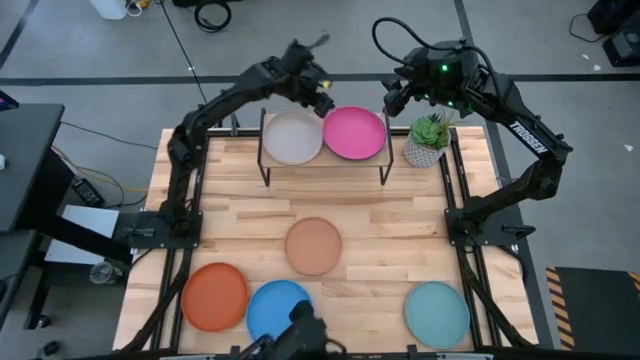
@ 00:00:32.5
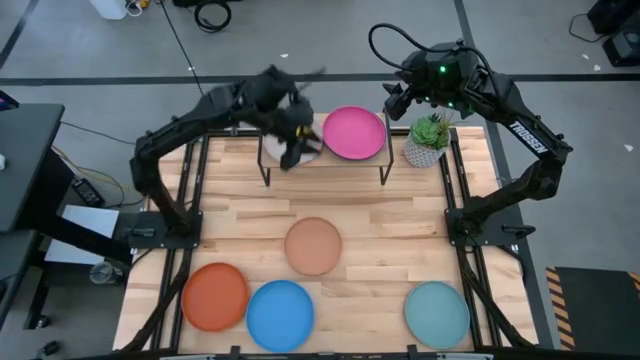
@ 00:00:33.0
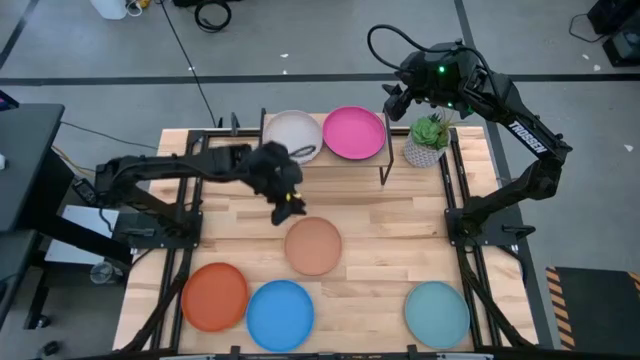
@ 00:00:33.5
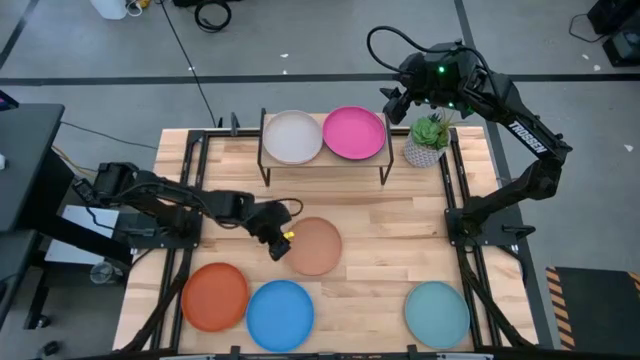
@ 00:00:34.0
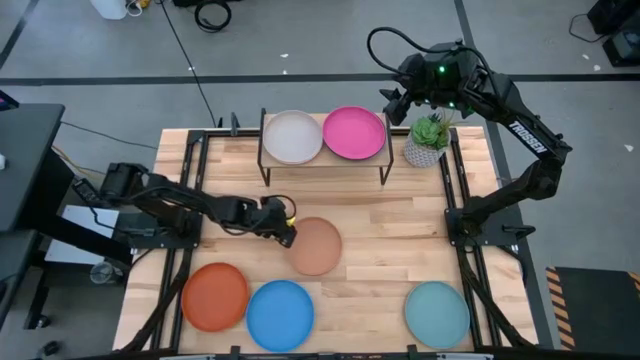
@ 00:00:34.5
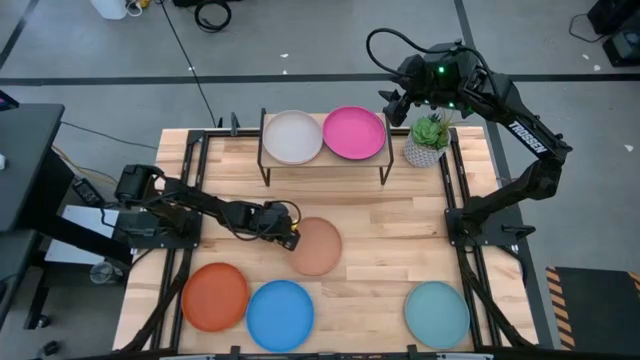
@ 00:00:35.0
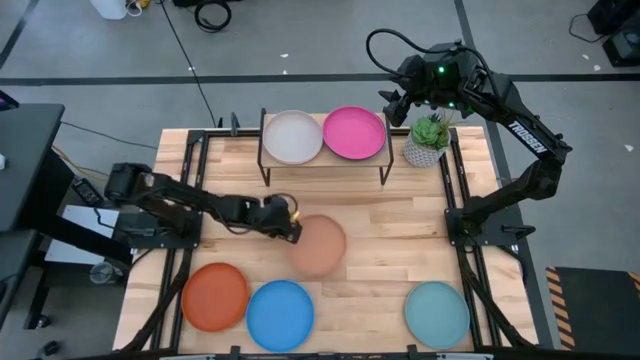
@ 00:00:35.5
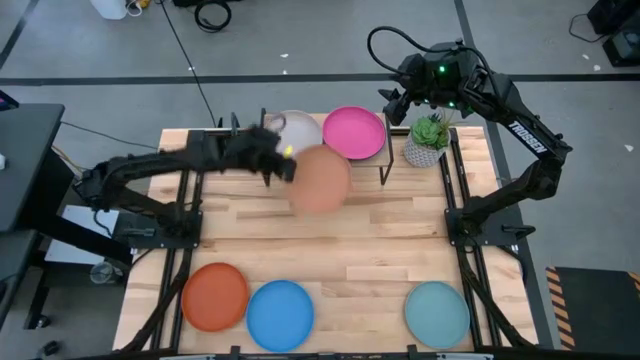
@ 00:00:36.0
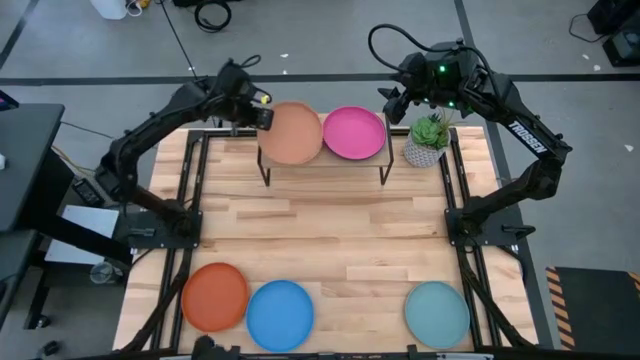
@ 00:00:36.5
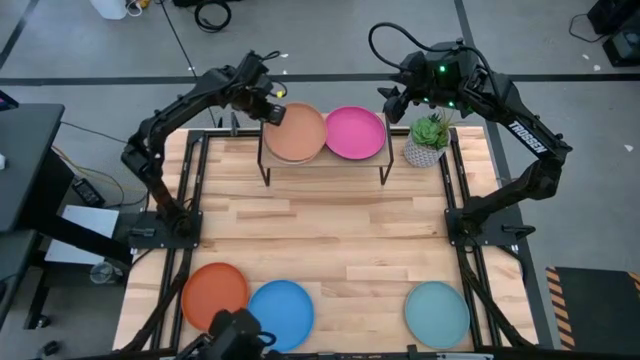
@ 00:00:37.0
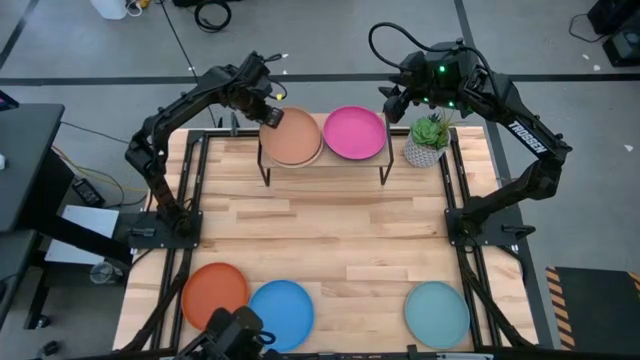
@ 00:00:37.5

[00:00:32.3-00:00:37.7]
Task: Place and stack plates onto a shelf
Stack the brown plate on top of the gray plate on the shelf

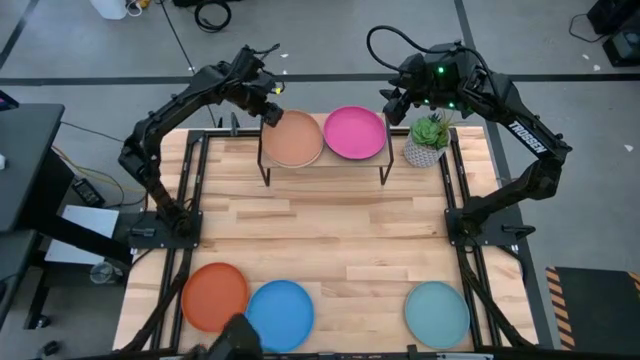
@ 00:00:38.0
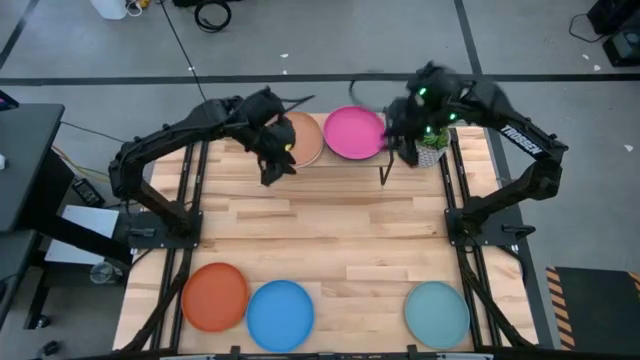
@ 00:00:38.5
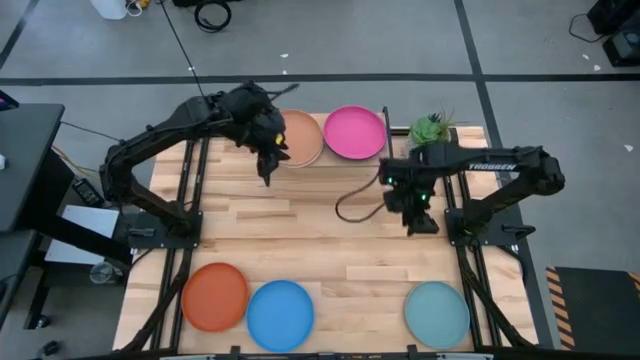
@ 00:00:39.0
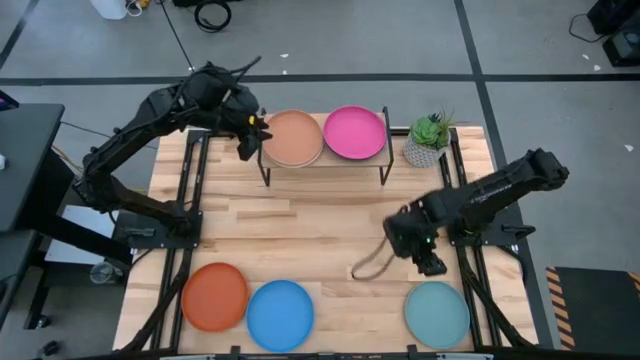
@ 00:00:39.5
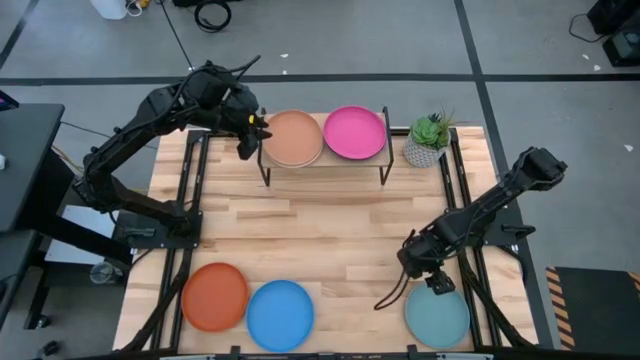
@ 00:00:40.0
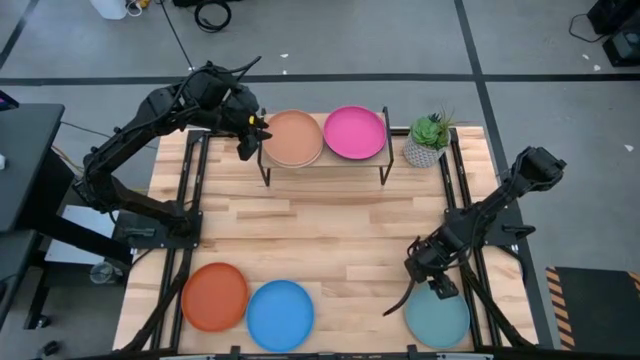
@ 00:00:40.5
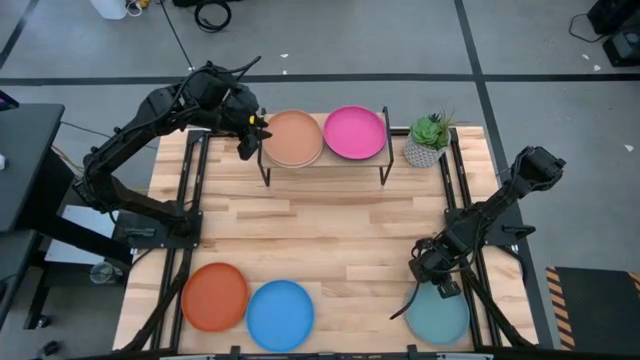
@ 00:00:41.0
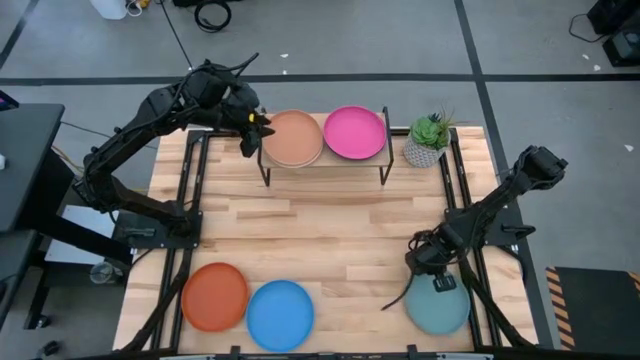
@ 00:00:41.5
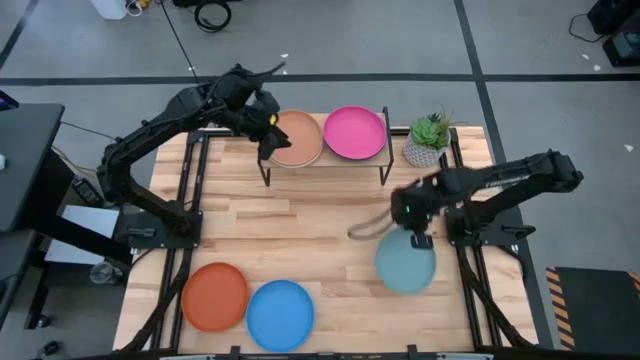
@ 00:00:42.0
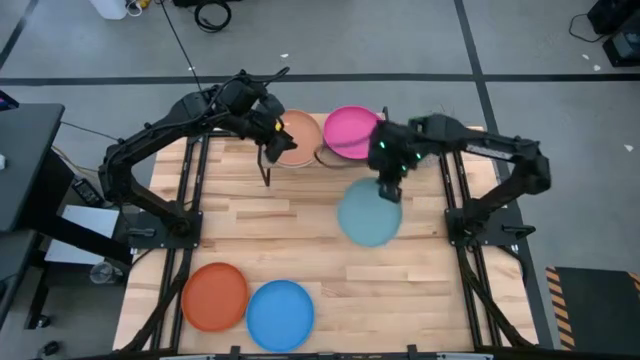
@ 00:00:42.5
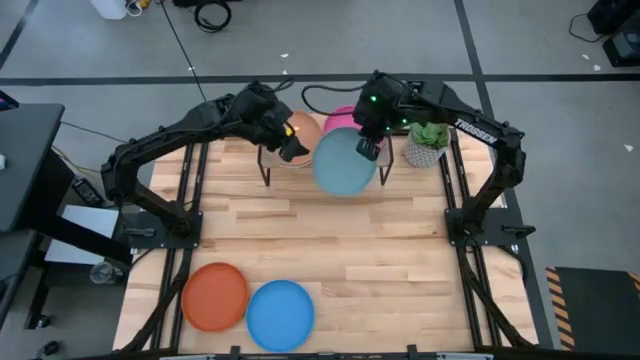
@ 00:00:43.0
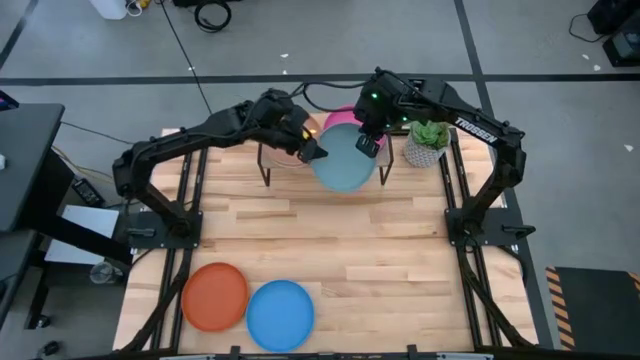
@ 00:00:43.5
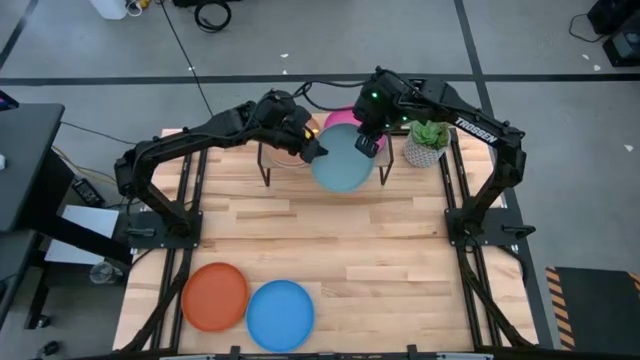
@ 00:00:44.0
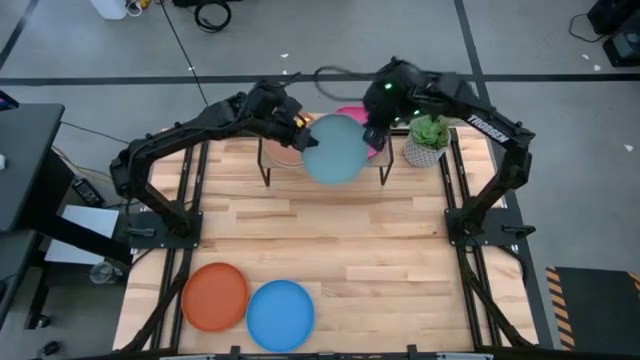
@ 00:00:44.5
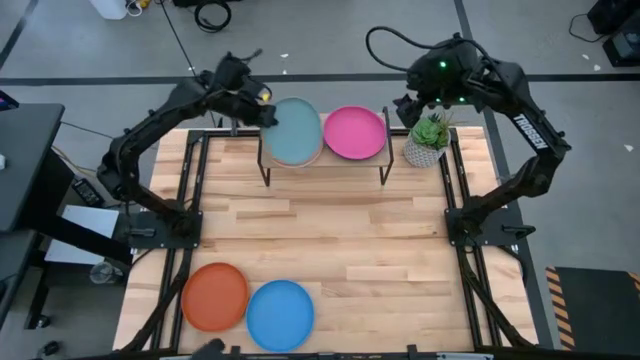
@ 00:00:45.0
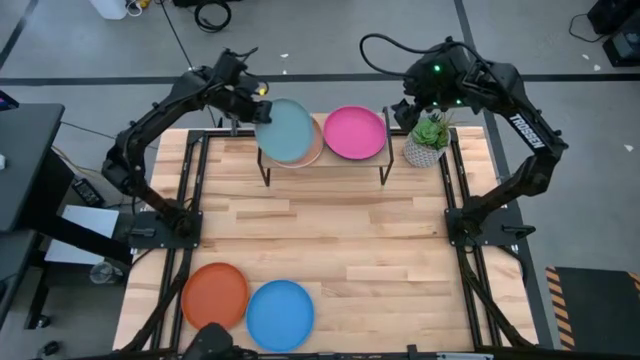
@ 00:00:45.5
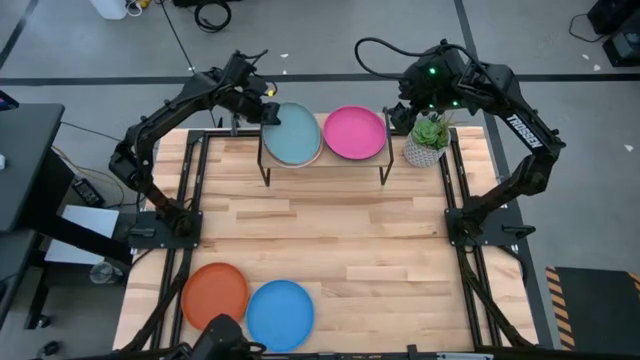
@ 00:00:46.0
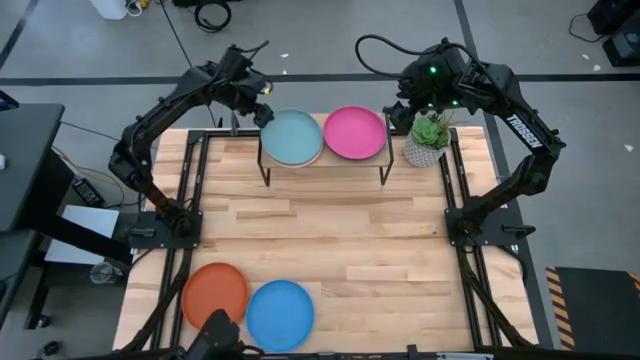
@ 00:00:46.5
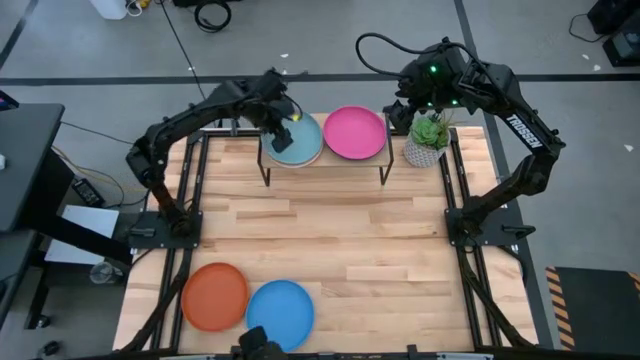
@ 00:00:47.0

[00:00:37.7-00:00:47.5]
Stack the light blue plate on top of the brown plate on the shelf

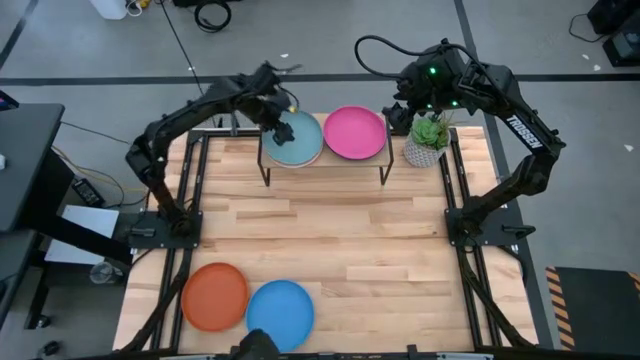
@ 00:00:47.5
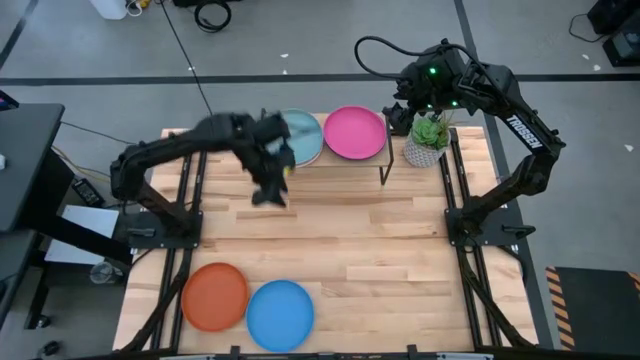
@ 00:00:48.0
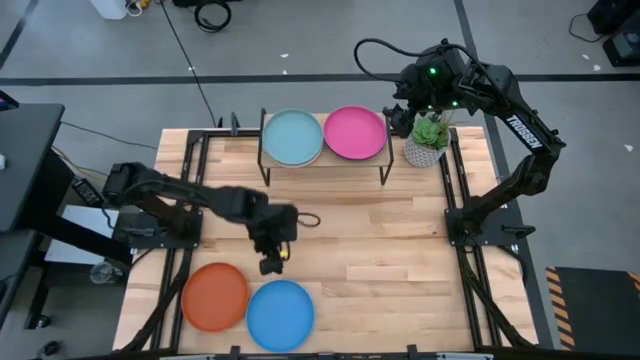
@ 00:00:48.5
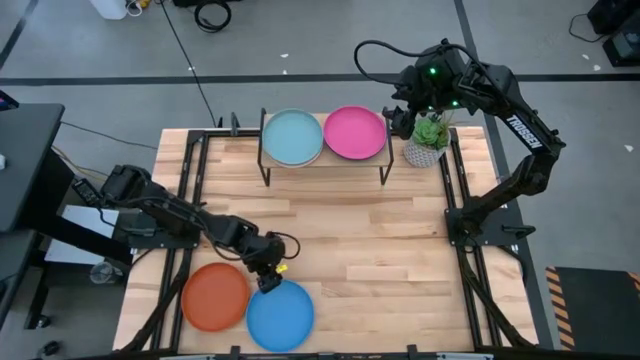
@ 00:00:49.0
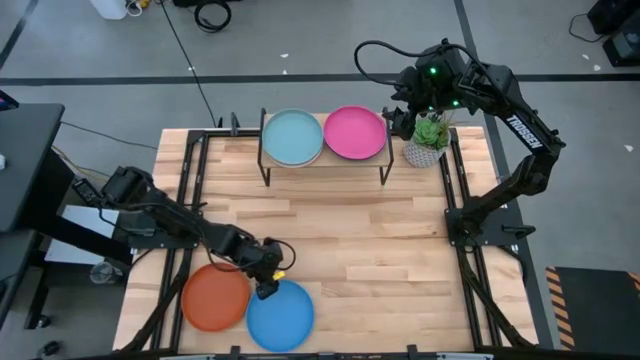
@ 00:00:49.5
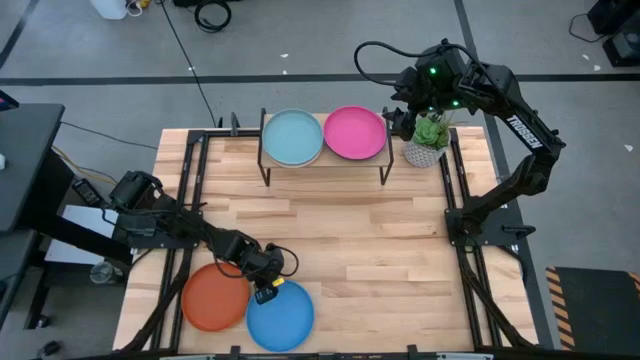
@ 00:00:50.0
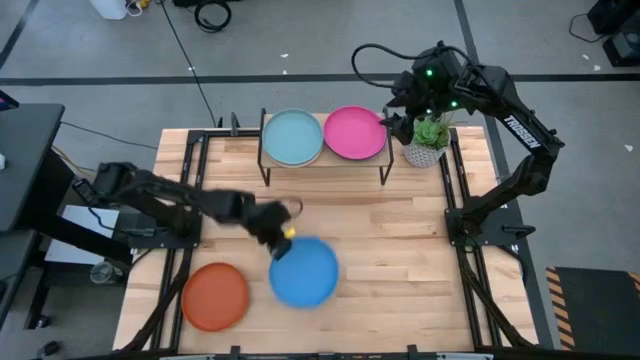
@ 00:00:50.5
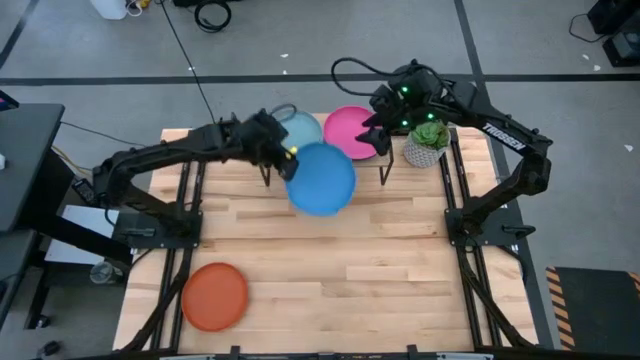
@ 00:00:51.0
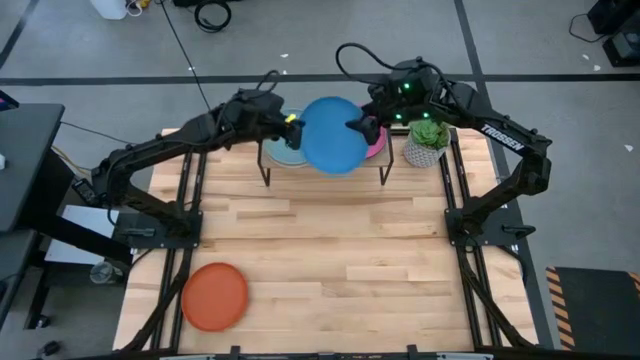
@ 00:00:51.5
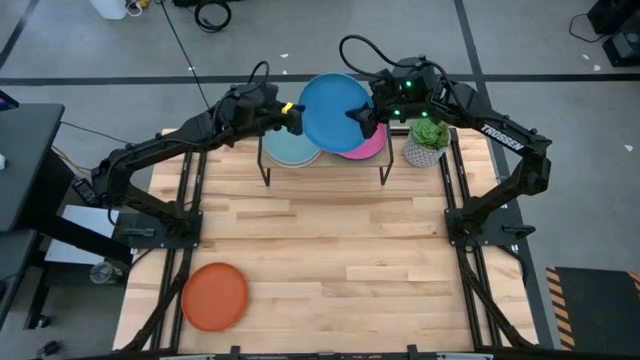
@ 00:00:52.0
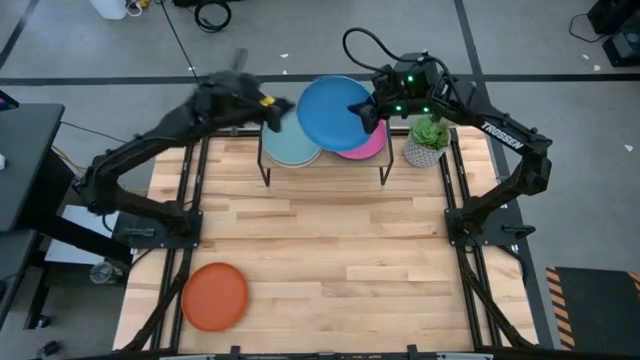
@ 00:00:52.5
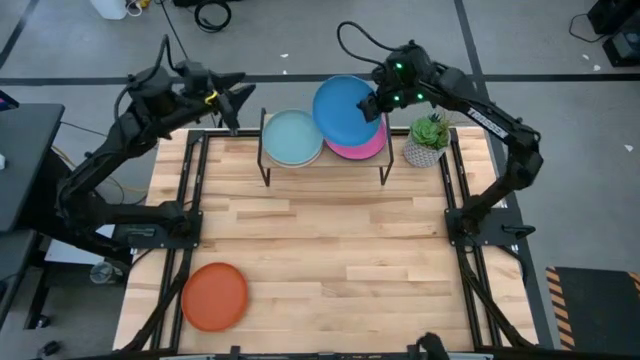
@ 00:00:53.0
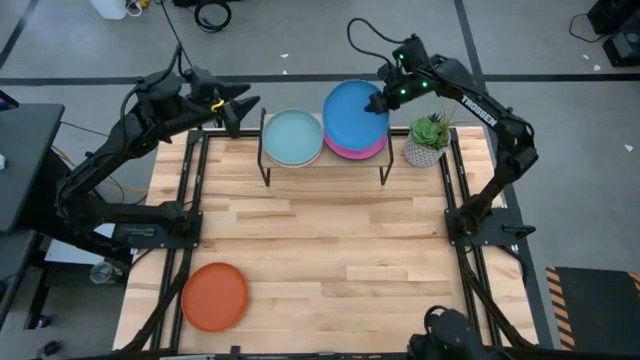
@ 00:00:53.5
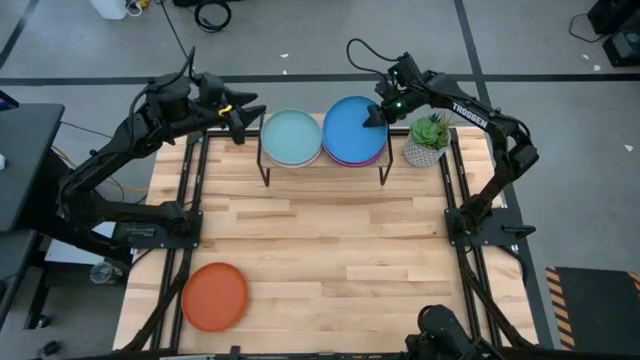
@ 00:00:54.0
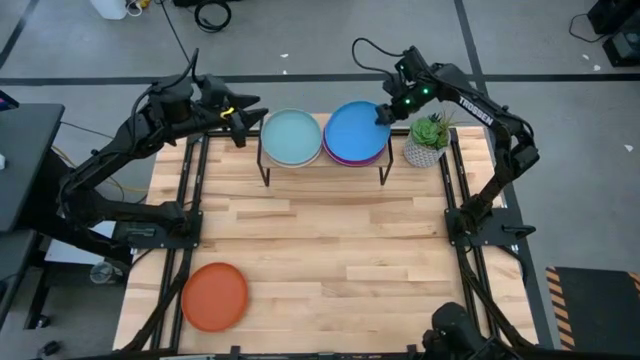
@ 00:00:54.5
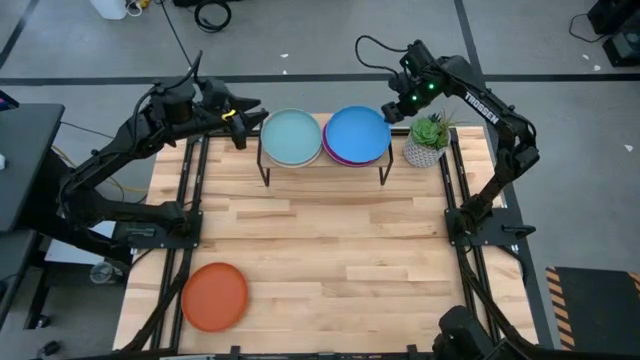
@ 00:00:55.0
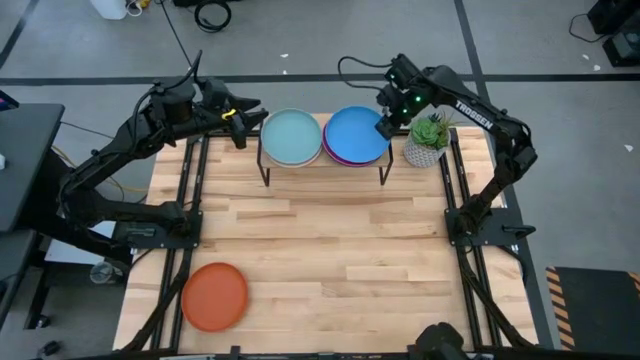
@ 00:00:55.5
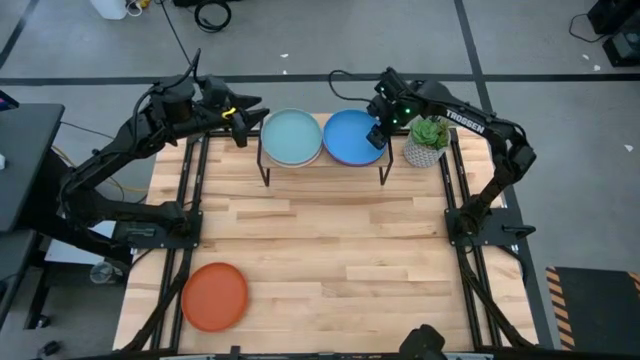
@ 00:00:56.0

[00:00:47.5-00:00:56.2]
Stack the blue plate on top of the pink plate on the shelf
